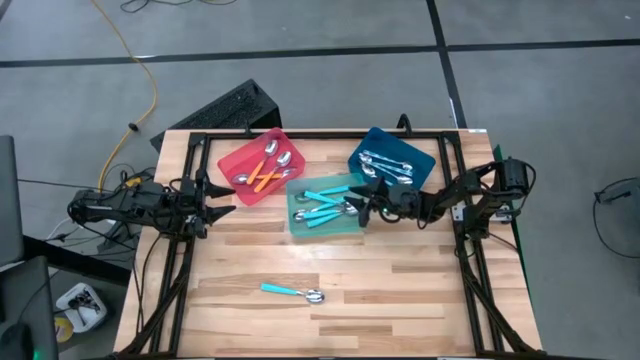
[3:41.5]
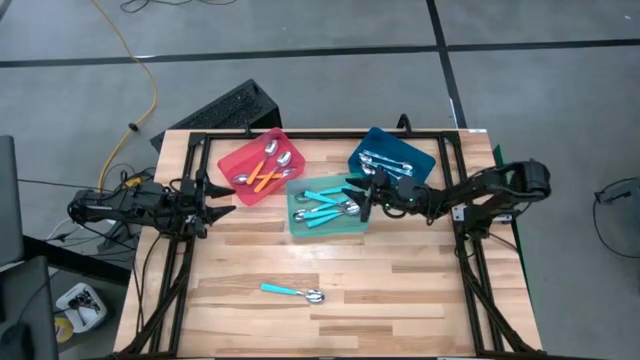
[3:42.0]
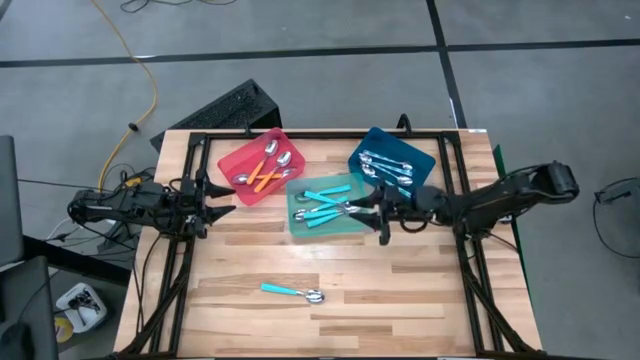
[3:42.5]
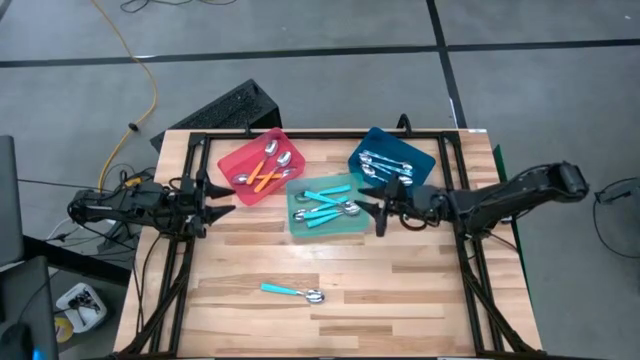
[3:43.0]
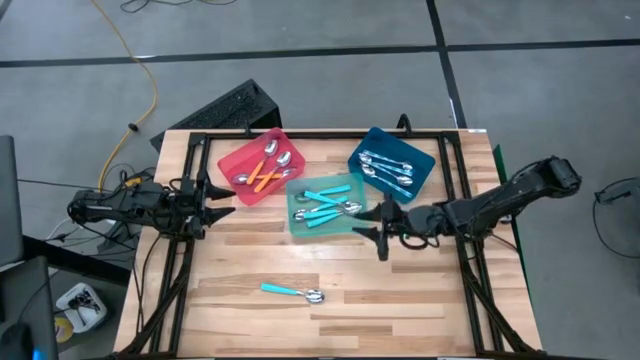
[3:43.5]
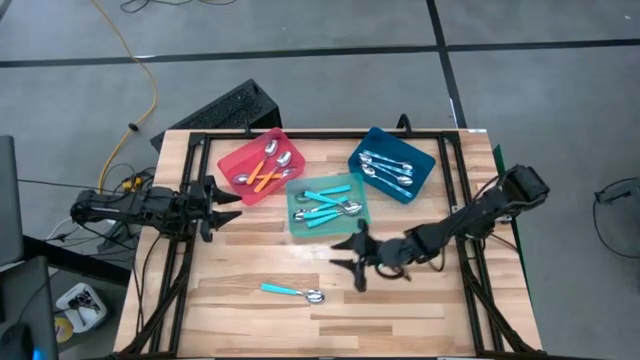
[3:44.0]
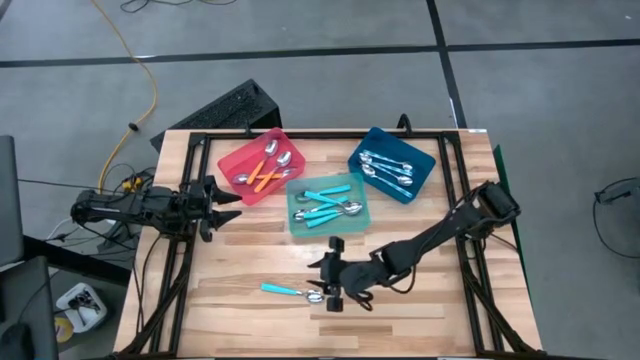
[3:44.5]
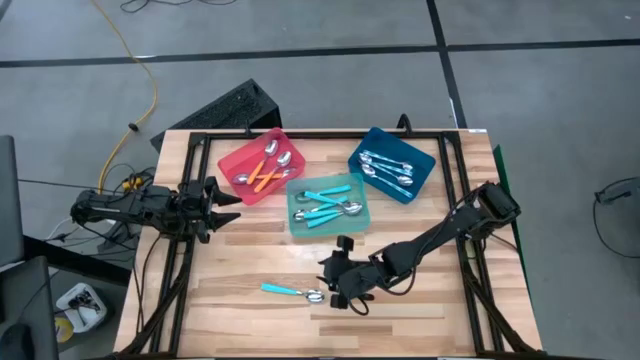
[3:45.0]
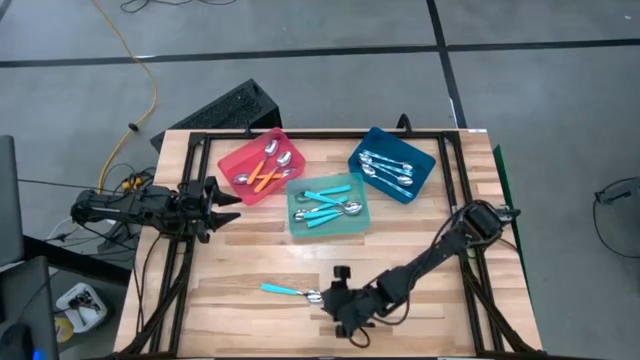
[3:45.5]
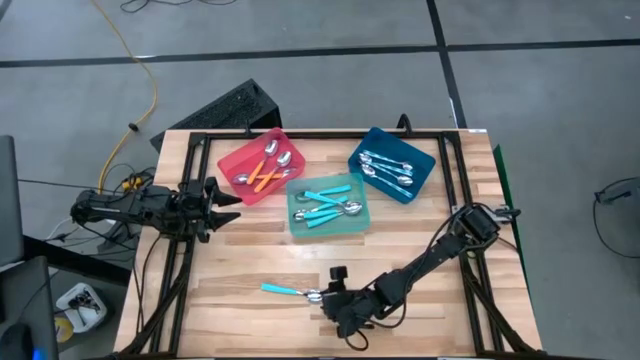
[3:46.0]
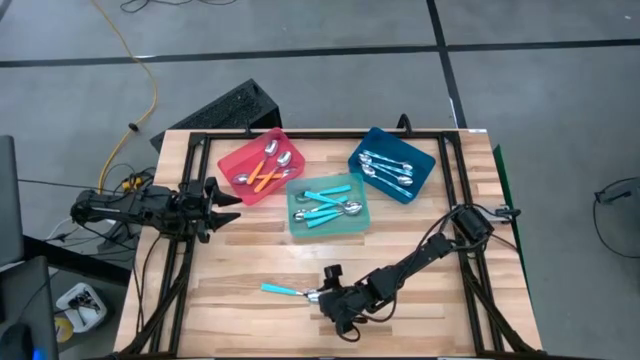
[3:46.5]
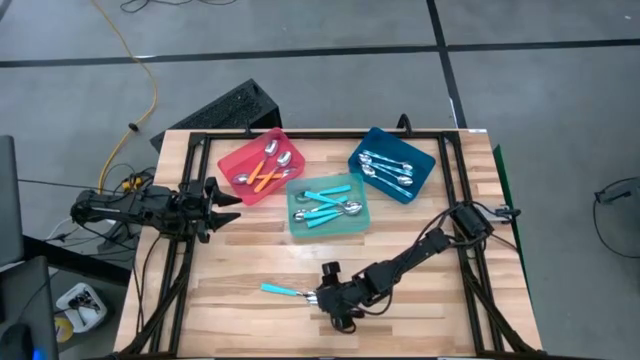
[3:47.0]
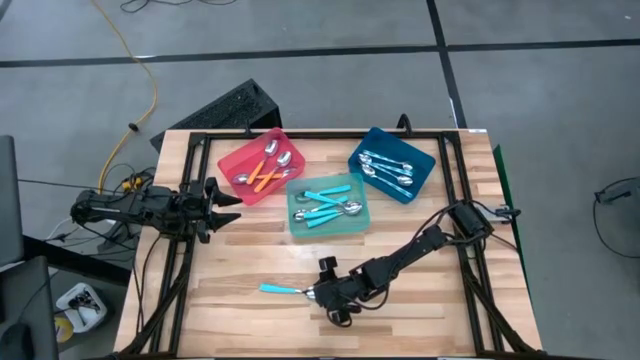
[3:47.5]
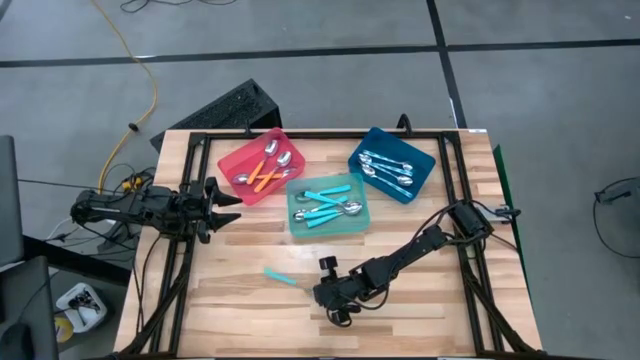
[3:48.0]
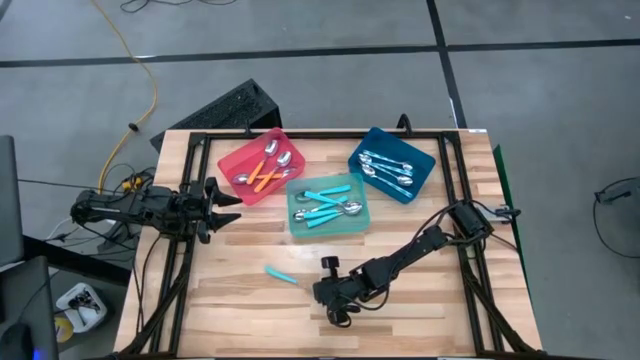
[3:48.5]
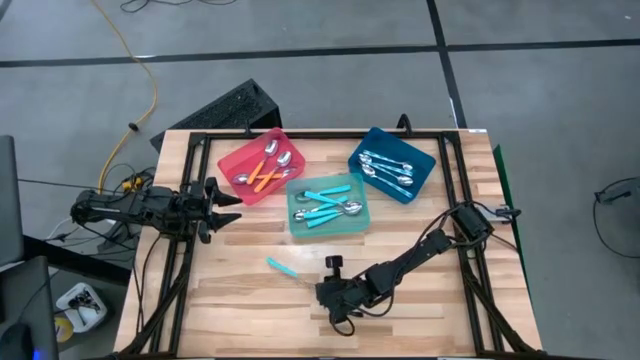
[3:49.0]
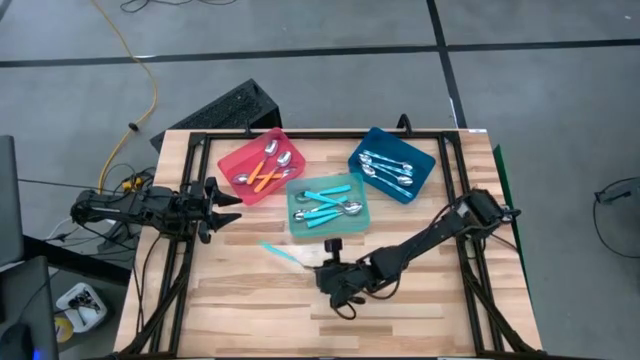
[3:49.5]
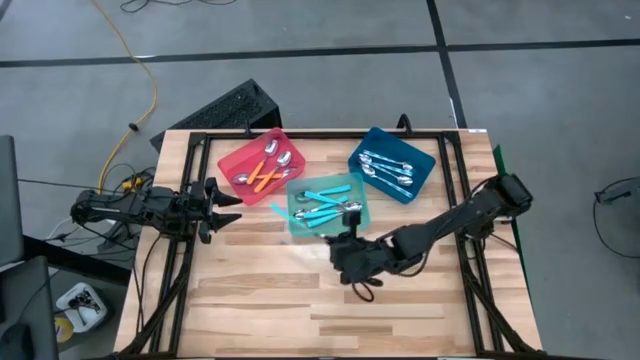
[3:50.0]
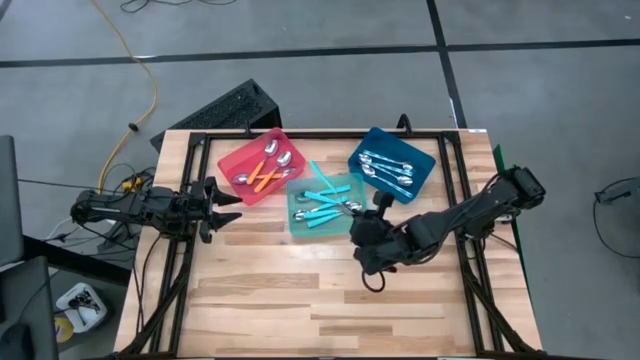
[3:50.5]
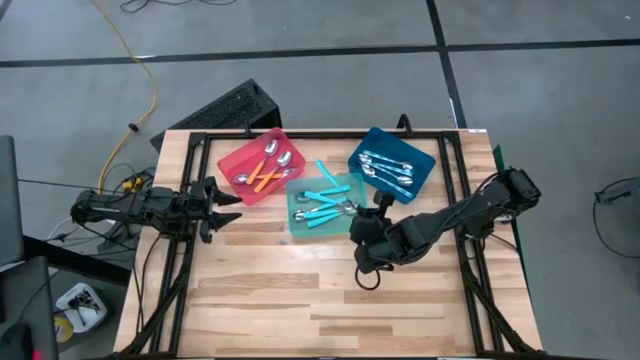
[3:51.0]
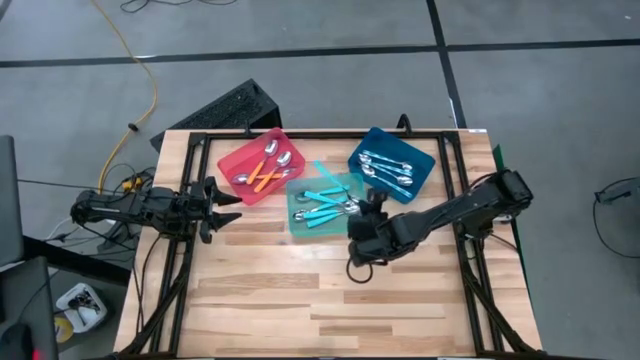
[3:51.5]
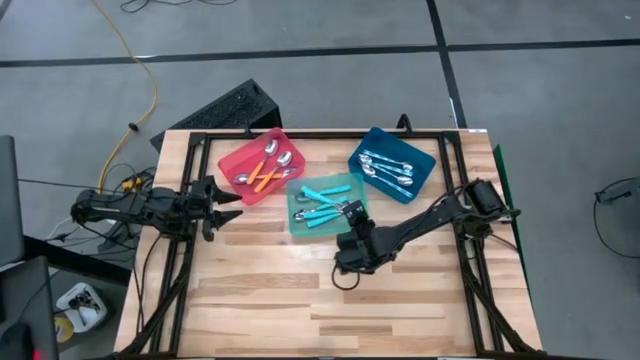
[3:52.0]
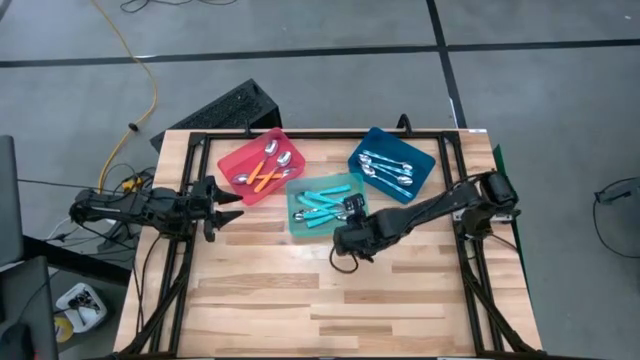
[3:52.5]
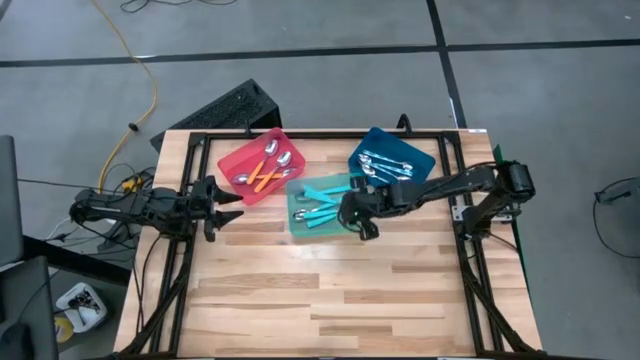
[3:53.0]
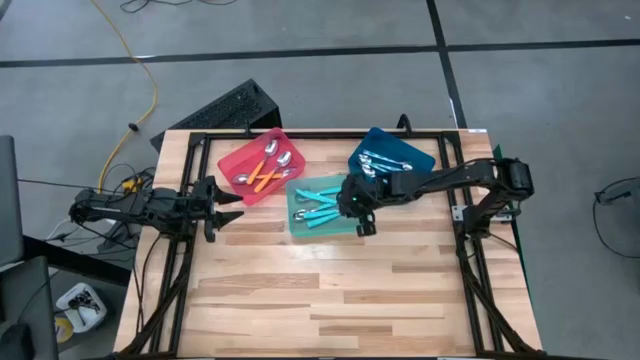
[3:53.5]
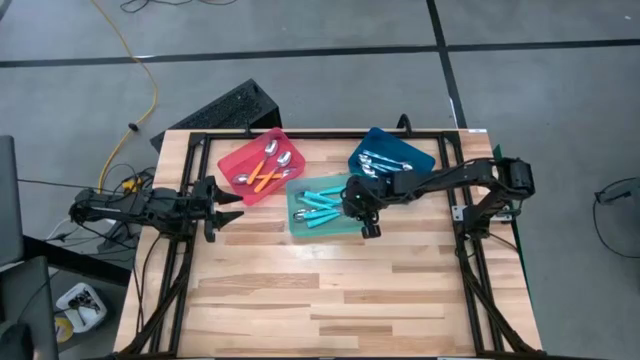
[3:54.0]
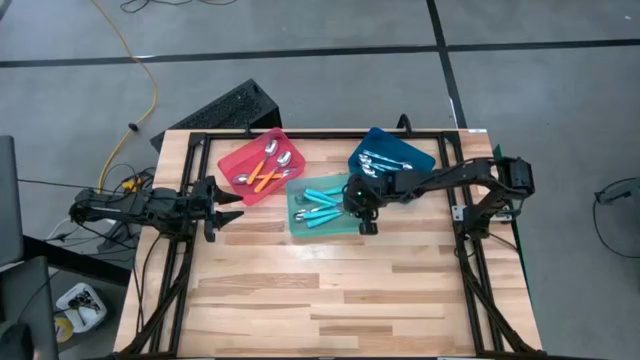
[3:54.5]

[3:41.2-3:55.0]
Task: Sort silverware by color (type)
Put the blue spoon into the green bin

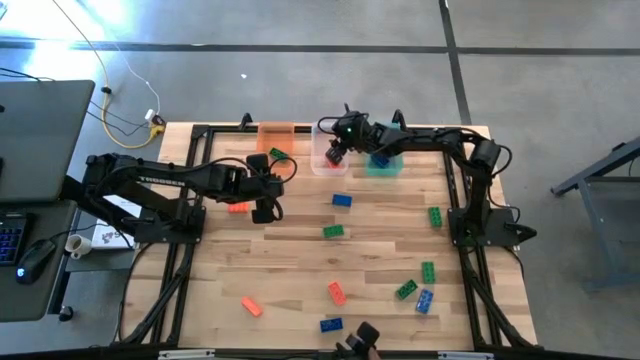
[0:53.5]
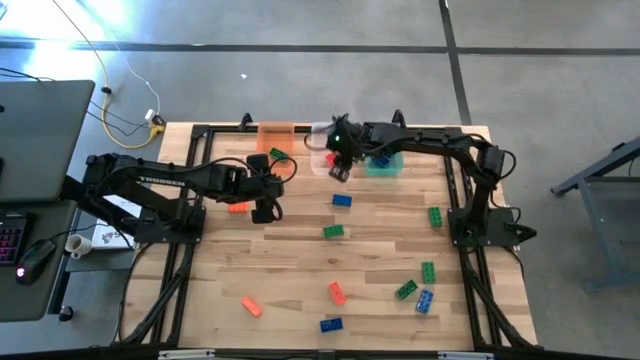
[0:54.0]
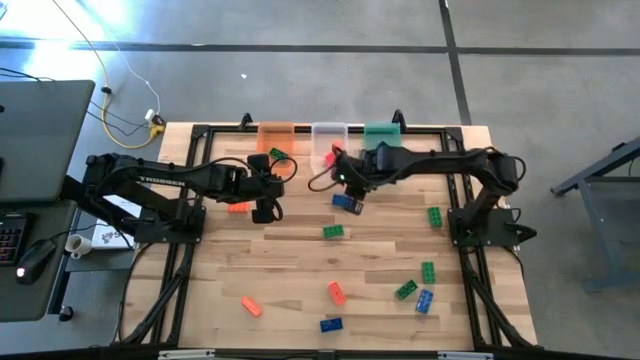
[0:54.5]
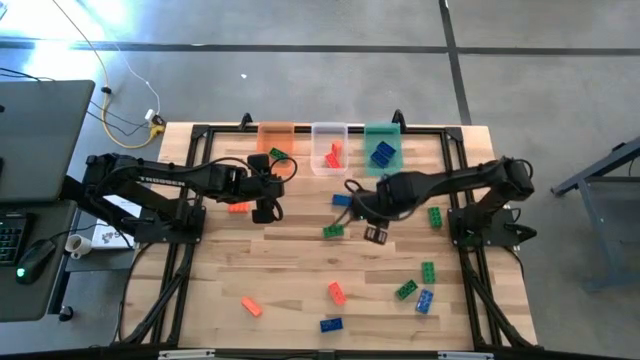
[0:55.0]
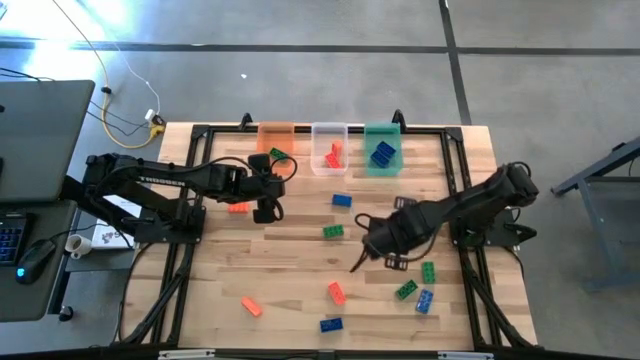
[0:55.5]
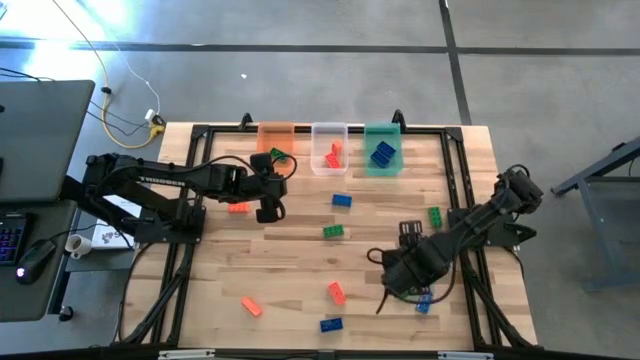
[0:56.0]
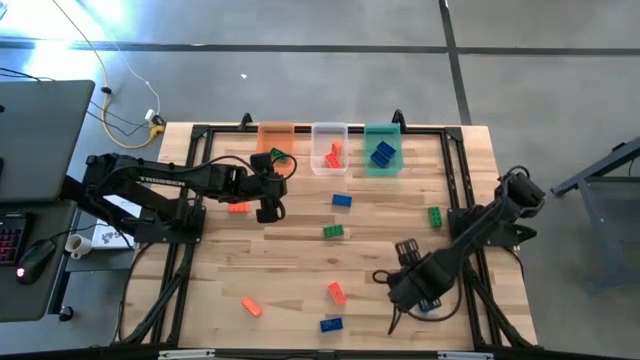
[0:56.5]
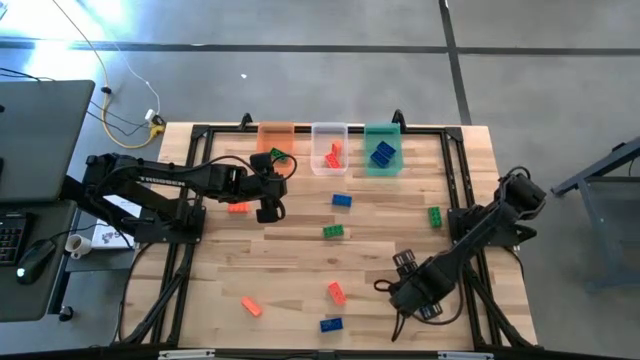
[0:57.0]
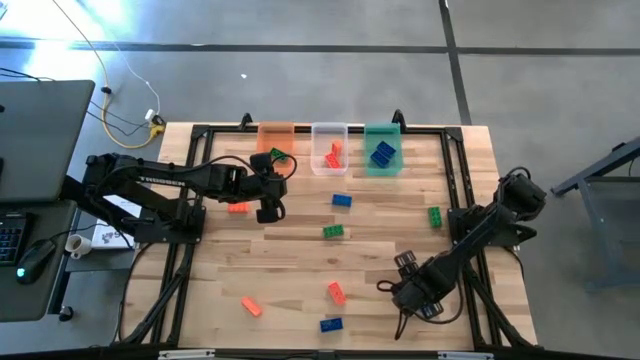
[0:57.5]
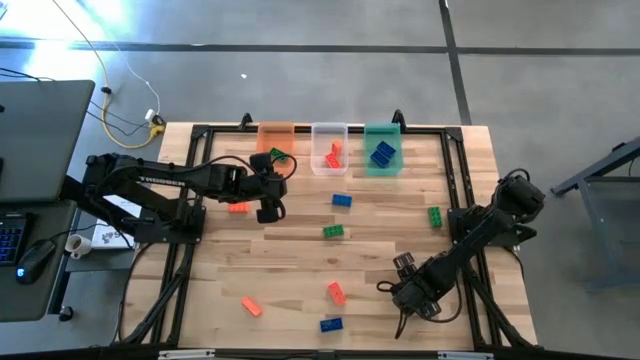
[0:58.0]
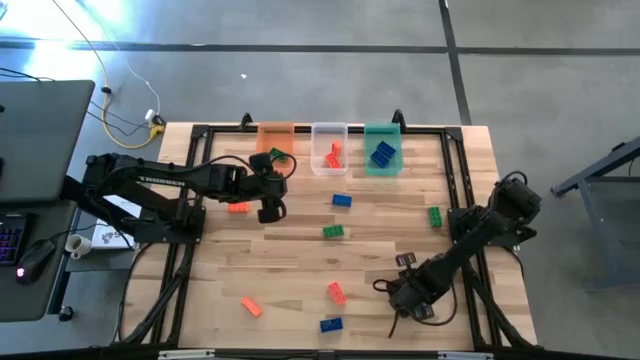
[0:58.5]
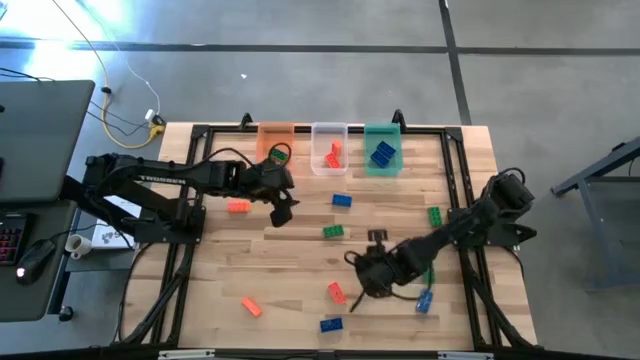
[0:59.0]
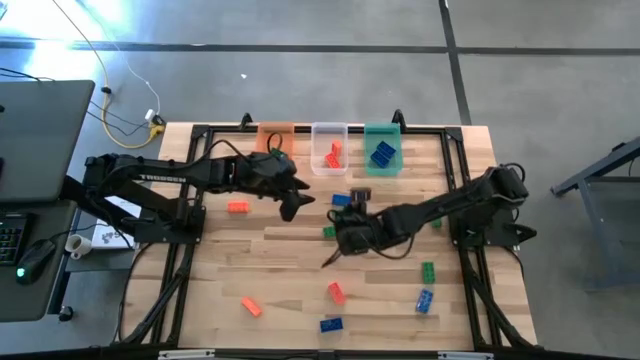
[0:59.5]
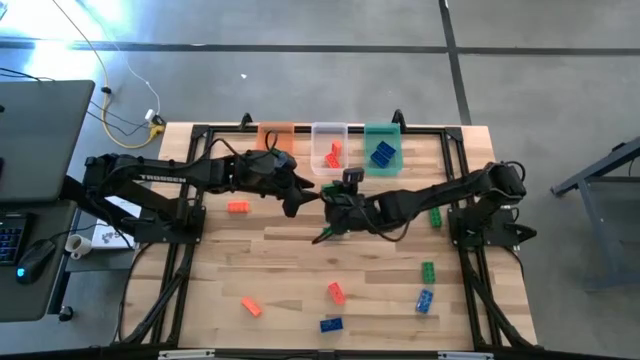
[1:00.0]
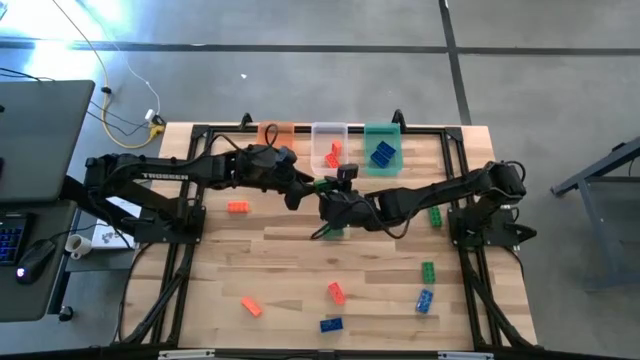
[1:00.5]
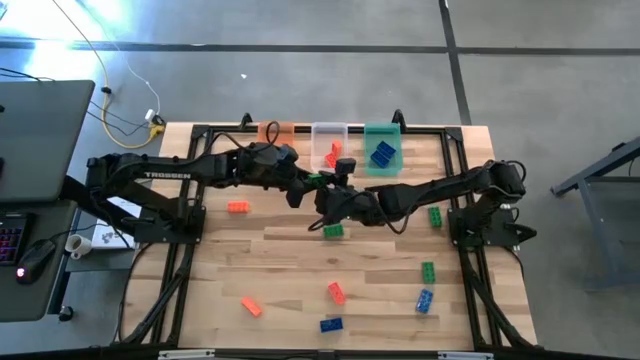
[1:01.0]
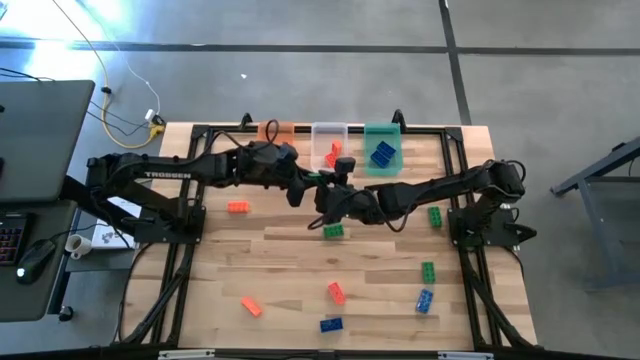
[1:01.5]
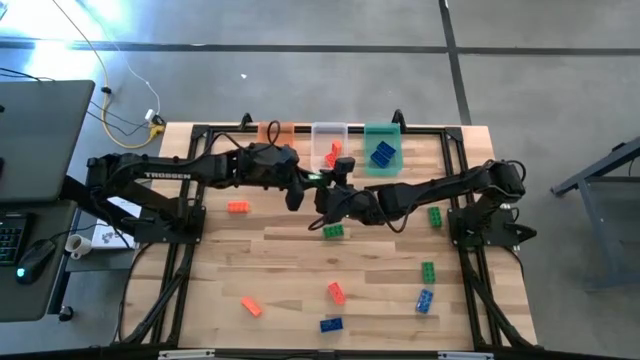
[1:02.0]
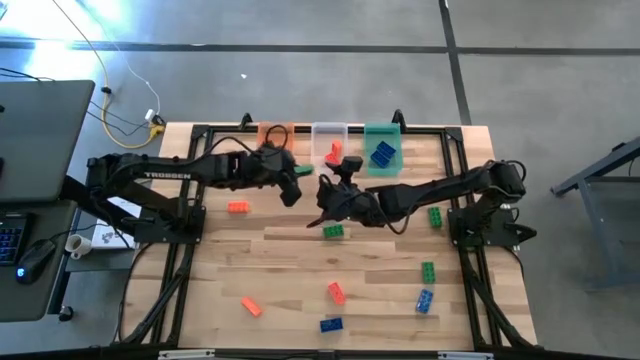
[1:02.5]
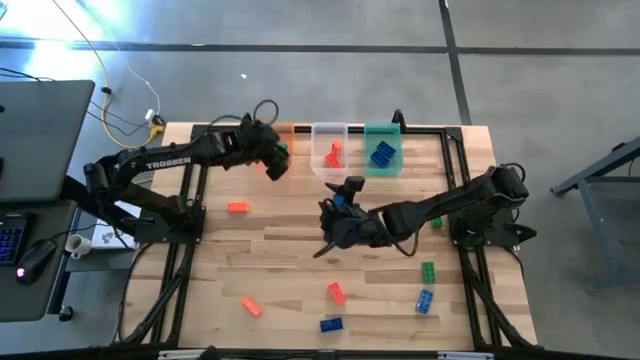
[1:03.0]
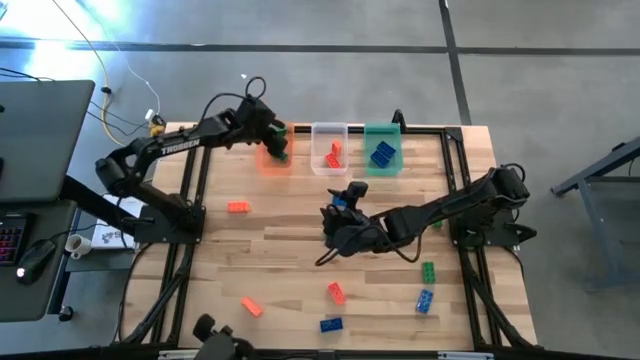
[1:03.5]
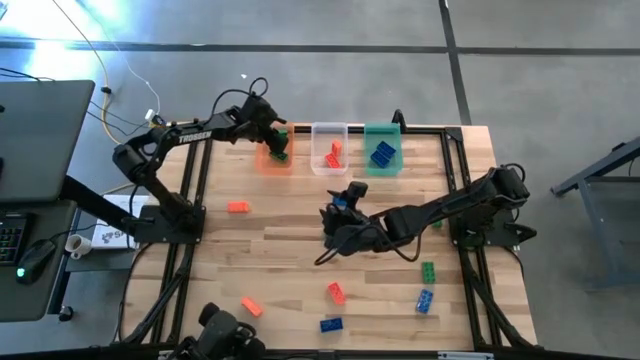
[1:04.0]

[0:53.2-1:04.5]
Task: Sort & place blocks by color
Put the green game piece into the orange bin
